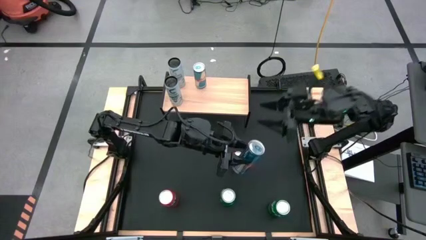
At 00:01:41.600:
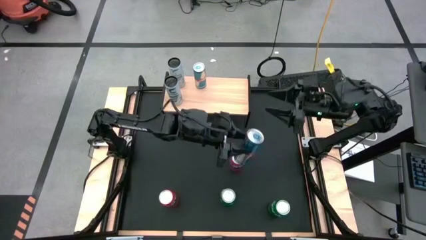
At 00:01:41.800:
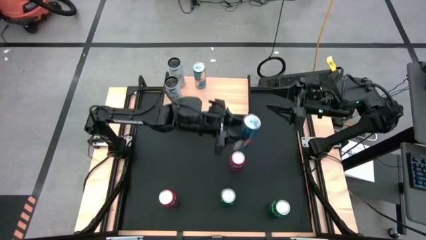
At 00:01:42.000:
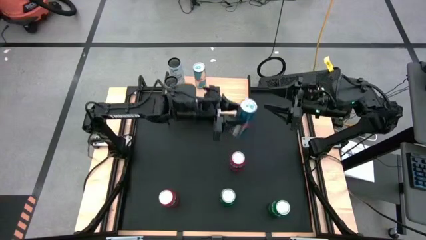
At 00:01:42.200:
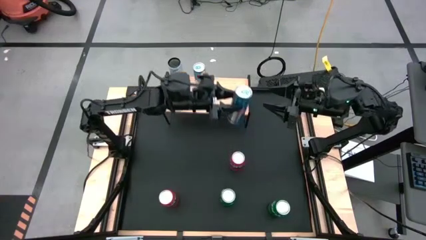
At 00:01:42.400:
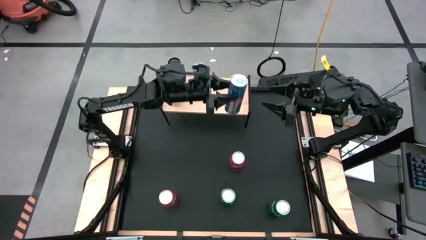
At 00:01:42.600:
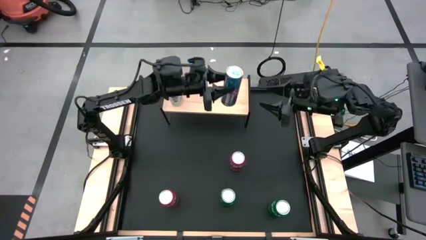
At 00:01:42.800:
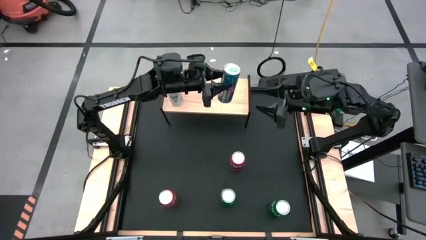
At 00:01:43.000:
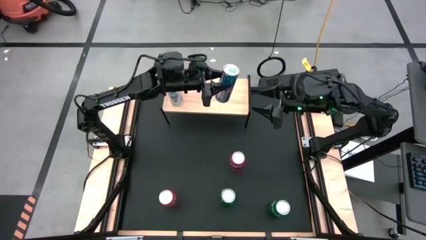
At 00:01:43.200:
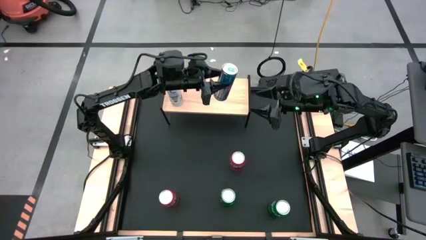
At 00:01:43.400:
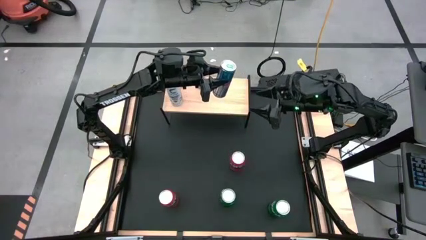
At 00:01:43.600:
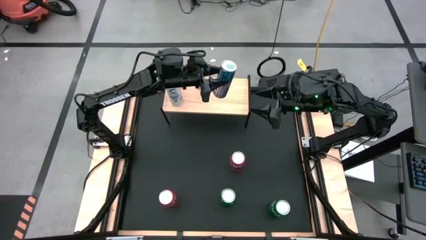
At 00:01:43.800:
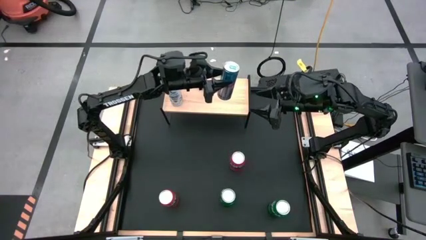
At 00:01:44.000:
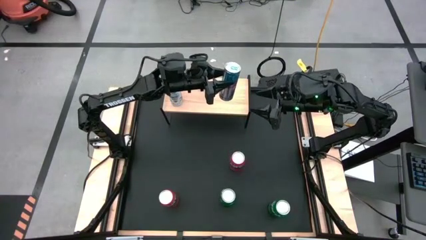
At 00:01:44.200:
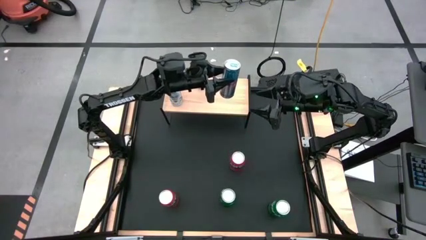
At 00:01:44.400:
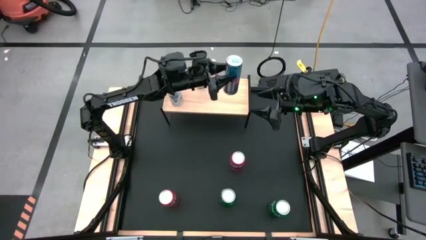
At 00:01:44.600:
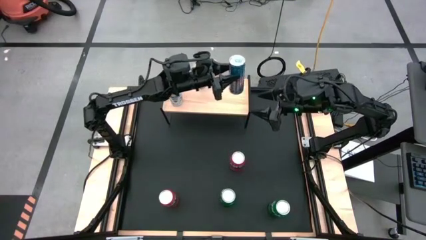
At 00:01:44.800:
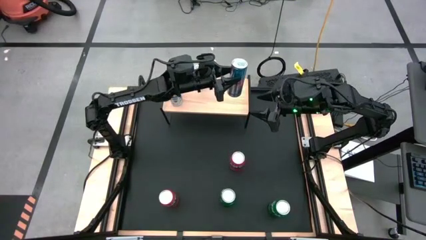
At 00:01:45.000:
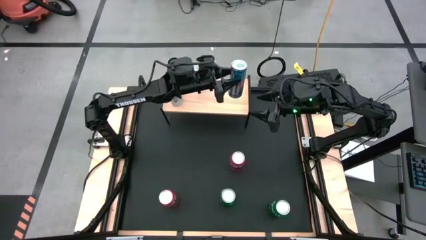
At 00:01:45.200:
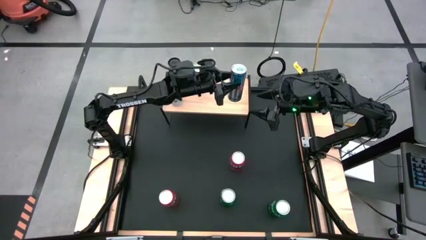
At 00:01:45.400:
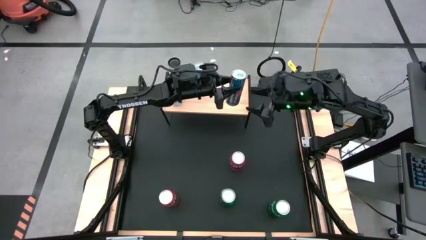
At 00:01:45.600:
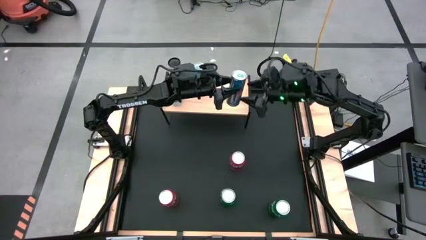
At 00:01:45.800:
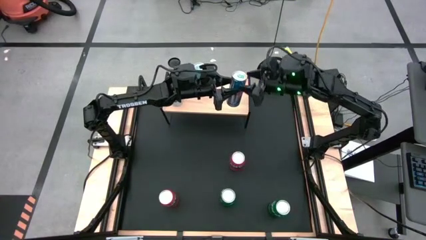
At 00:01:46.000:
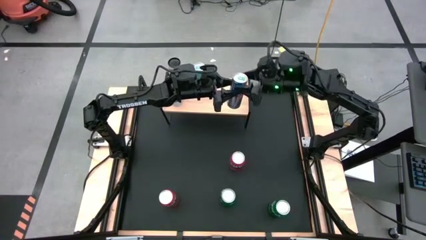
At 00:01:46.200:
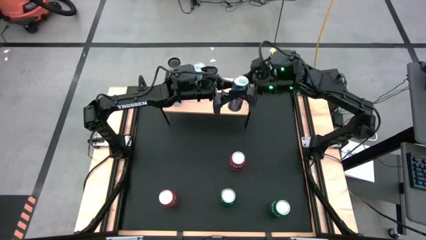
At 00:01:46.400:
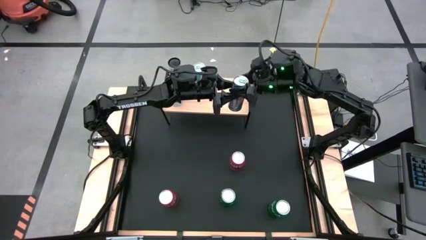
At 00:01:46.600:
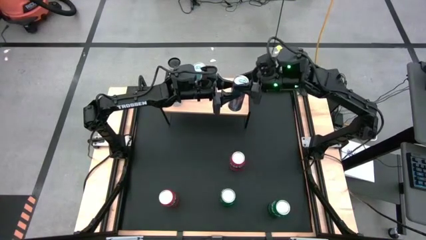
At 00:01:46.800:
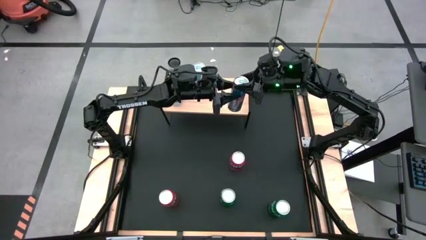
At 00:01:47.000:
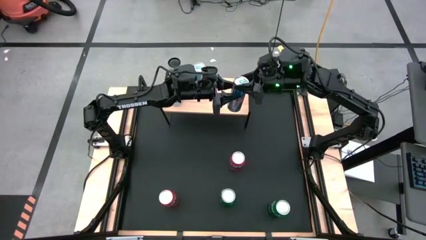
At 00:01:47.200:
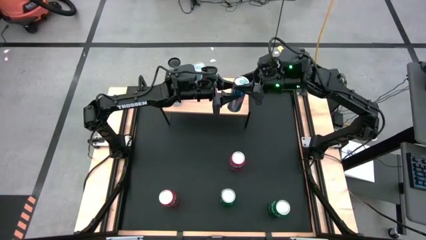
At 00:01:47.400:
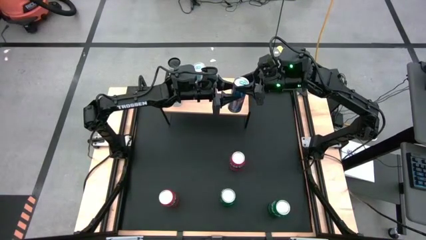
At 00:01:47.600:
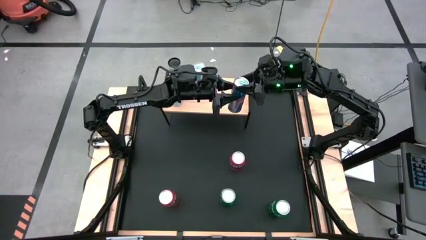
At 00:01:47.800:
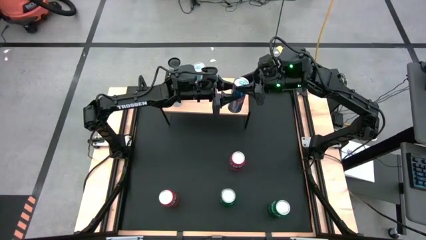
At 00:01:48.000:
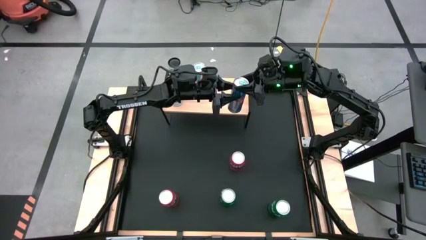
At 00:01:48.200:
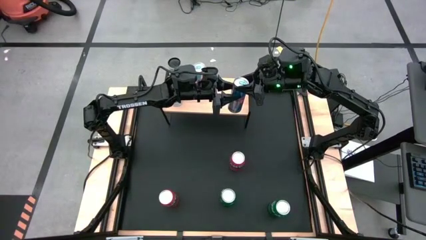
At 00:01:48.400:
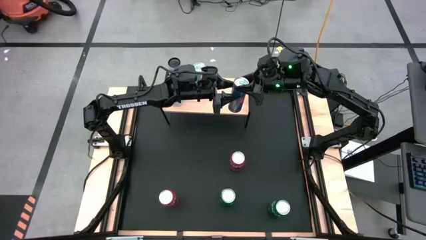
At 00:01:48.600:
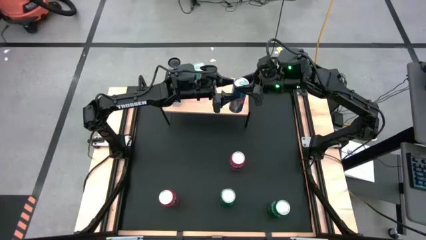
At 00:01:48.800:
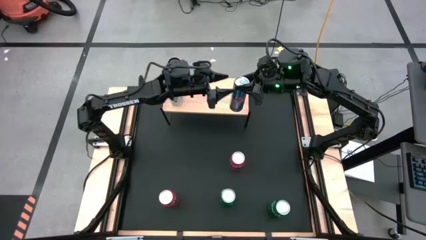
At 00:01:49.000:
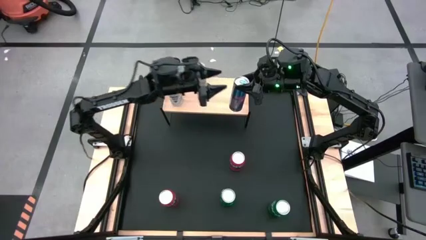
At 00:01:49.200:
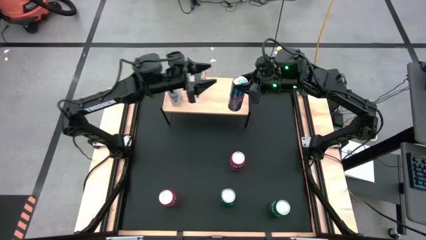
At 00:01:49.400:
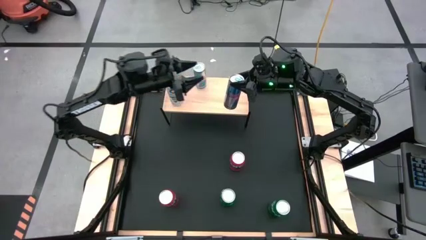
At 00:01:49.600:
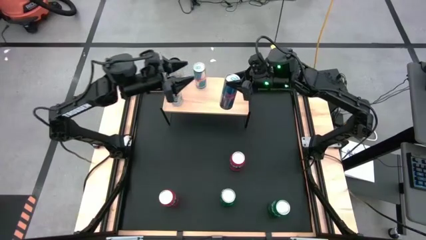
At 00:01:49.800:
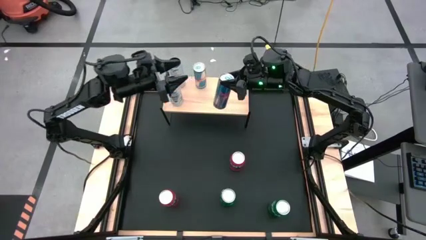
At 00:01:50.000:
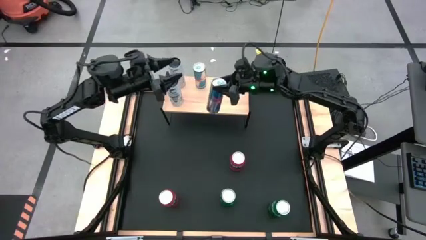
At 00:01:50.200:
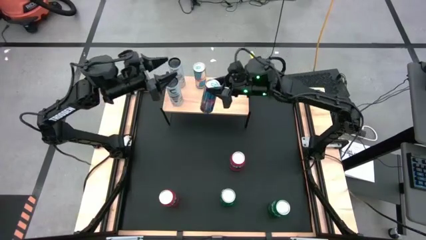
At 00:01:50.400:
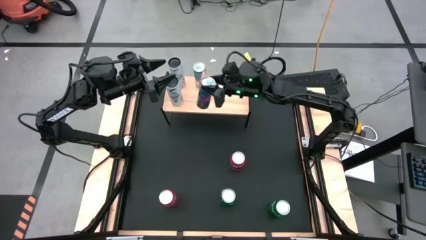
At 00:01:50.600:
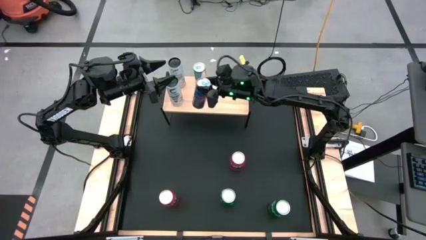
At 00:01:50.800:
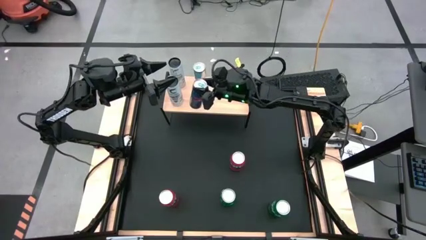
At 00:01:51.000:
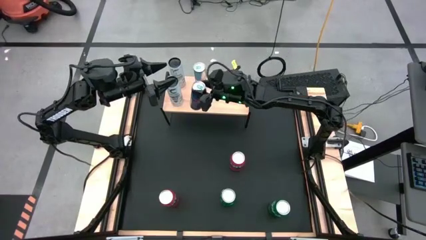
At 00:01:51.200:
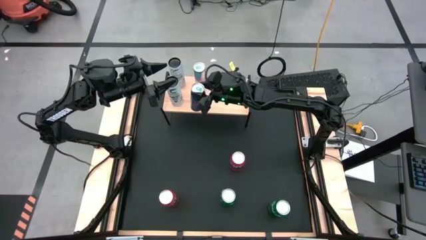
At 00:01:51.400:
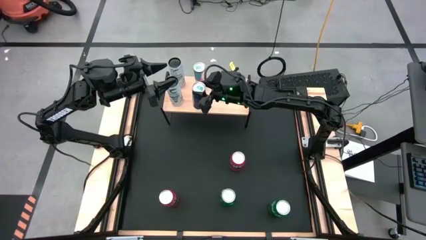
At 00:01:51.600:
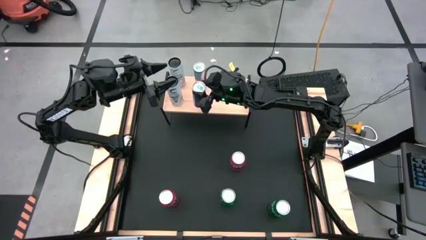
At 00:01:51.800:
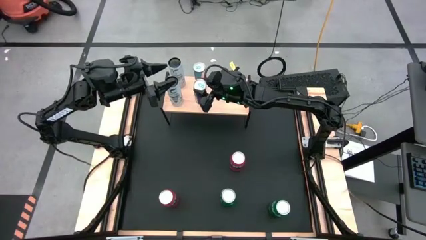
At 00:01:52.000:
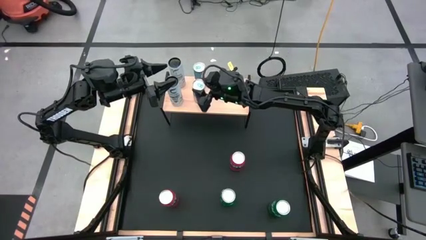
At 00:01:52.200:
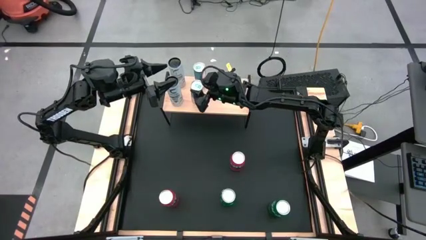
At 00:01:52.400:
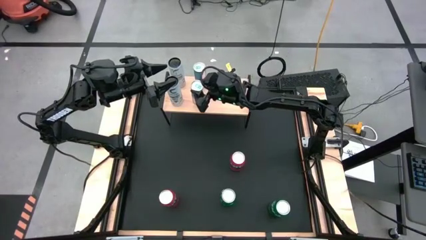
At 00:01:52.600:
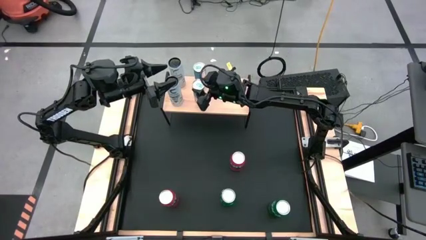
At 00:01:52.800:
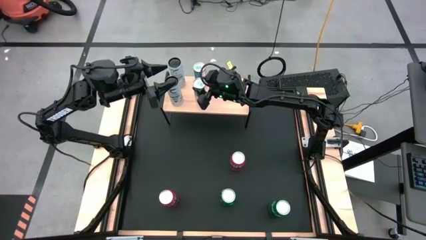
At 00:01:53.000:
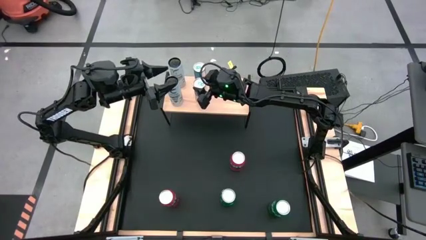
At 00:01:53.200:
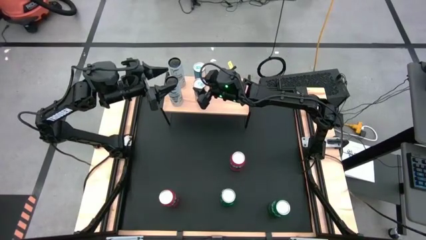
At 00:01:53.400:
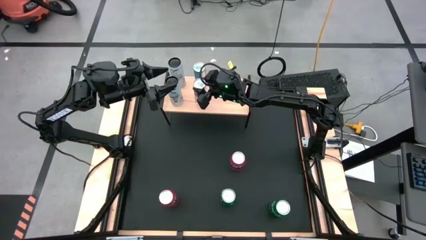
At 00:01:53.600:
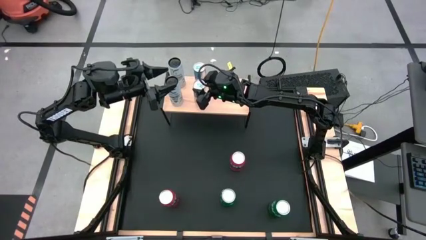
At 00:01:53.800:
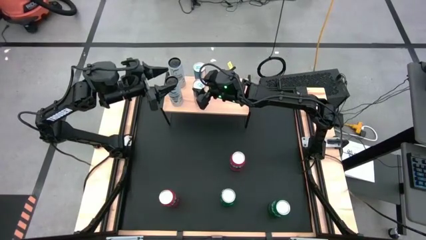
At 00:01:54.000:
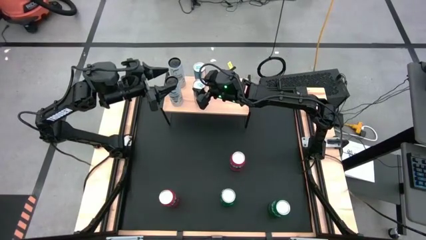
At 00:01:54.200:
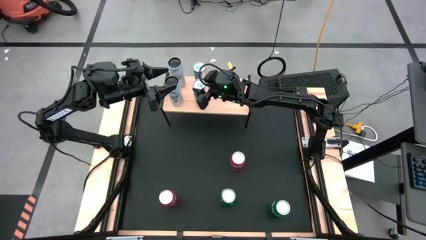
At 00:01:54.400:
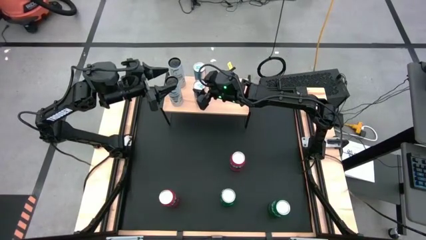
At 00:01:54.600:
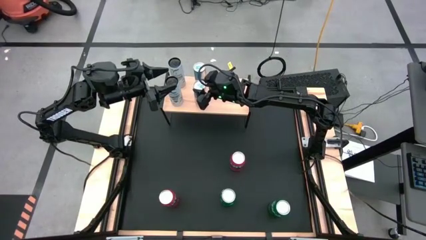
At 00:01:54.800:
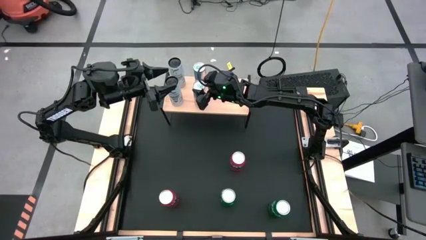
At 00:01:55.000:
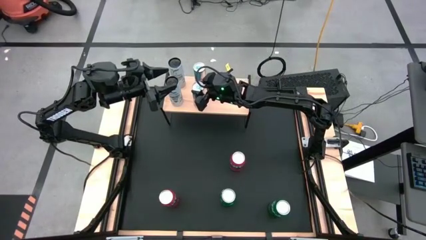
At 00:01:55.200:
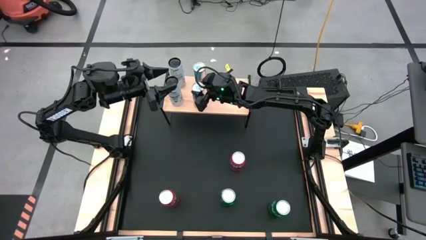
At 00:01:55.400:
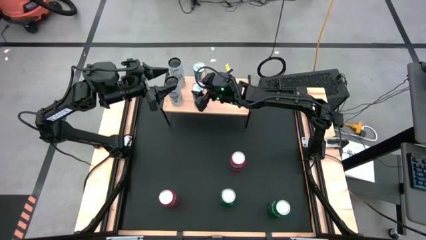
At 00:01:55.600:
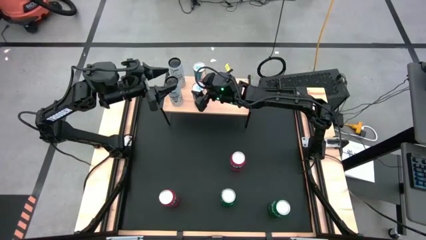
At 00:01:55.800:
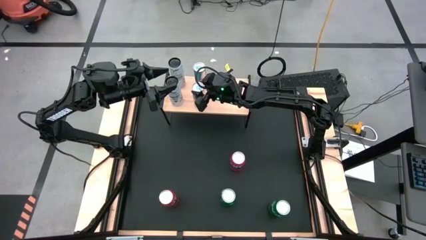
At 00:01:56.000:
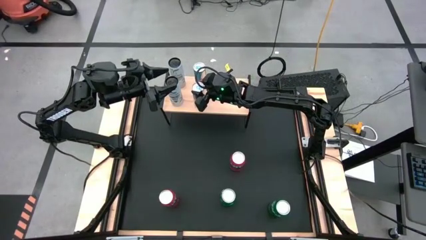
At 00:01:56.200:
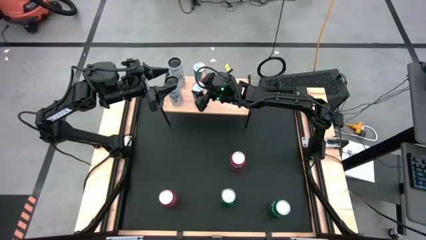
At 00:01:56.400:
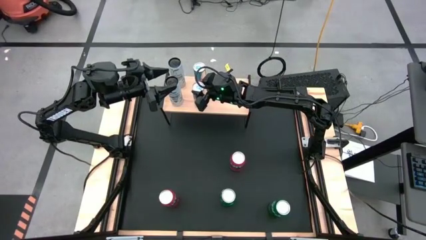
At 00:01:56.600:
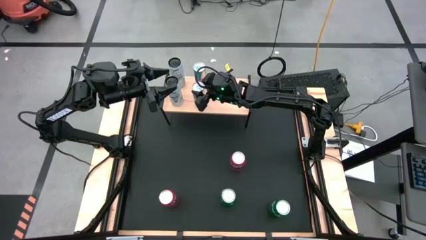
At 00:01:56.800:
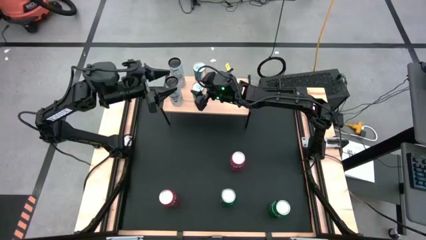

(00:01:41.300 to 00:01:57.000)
Task: Place canned beverage on shelf
Put the blue soda can, aligned with the other blue soda can on the shelf

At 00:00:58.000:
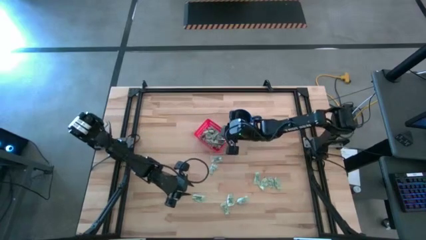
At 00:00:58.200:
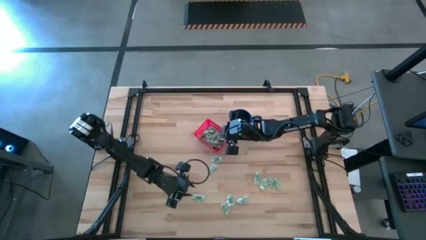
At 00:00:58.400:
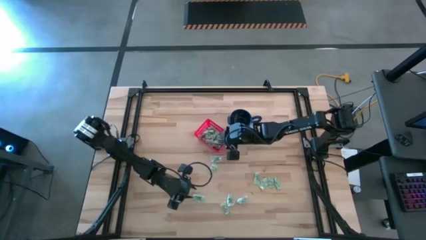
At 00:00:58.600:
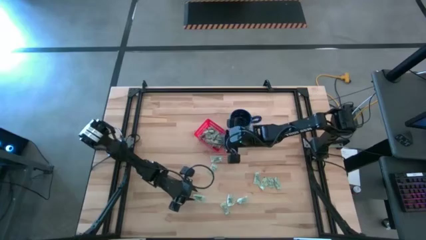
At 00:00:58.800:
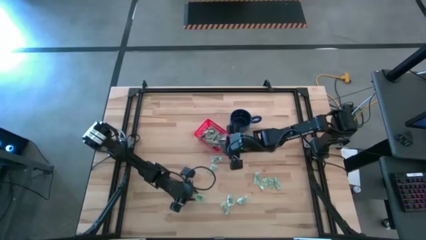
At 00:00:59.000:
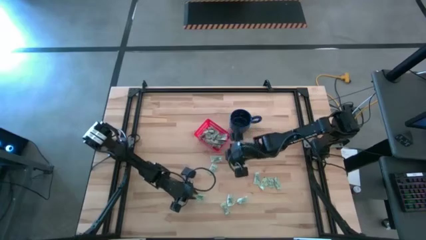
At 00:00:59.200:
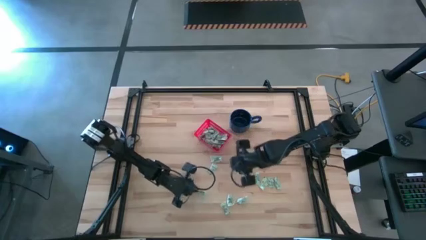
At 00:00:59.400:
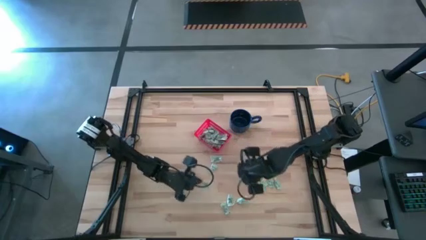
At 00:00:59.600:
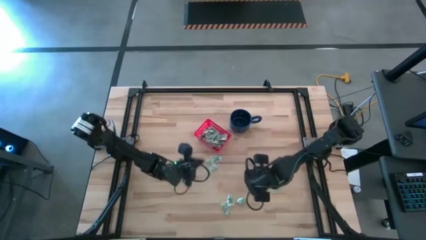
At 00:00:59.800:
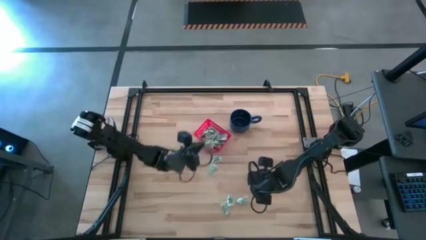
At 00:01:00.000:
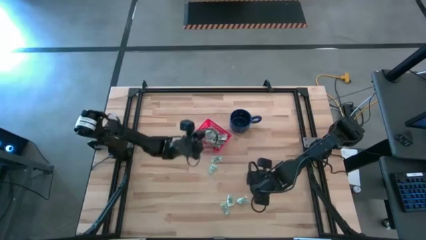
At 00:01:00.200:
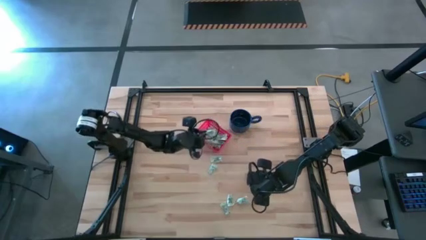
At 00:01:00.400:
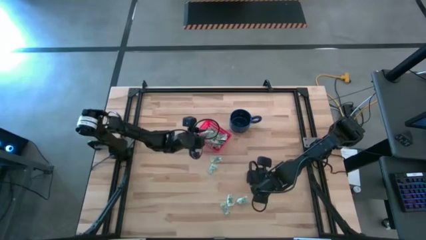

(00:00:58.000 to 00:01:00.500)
Task: Pick and place items into bin
Put the stevia packet into the bin
